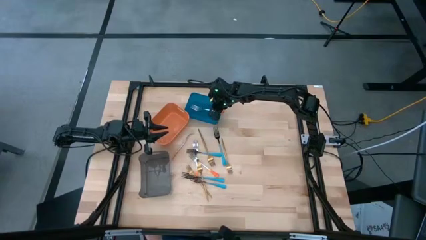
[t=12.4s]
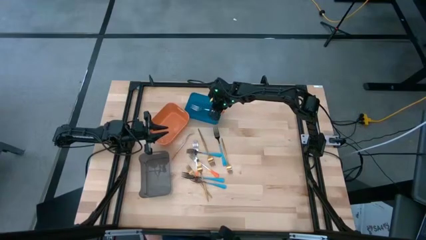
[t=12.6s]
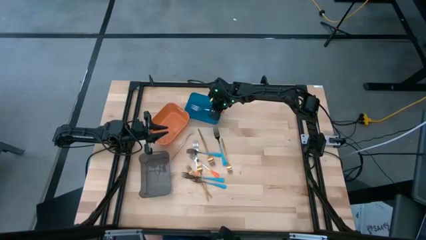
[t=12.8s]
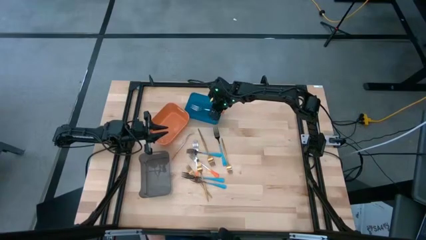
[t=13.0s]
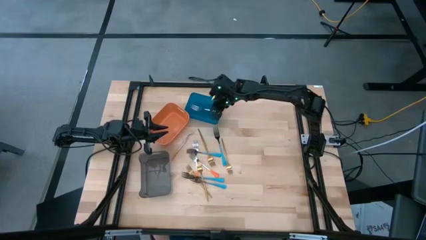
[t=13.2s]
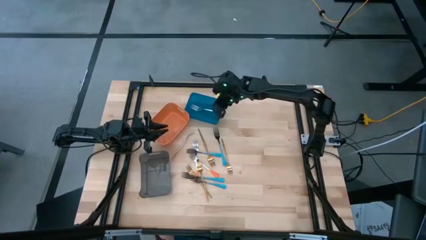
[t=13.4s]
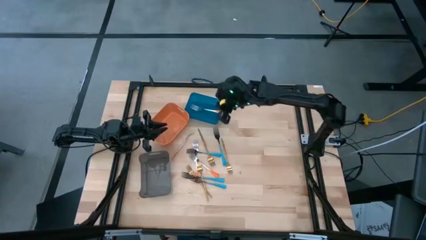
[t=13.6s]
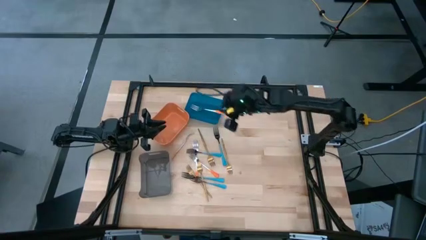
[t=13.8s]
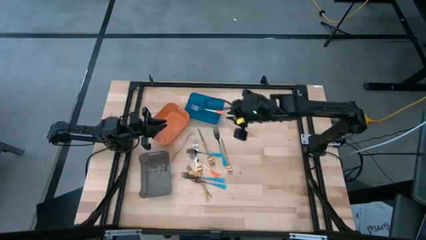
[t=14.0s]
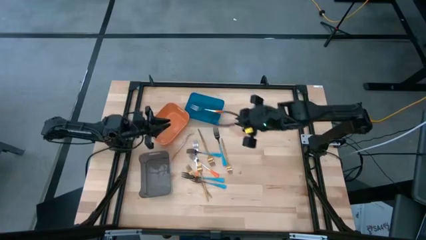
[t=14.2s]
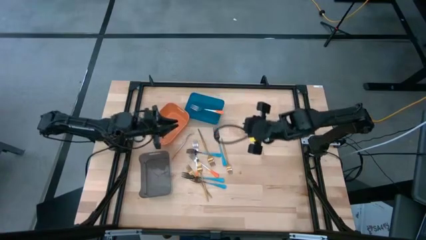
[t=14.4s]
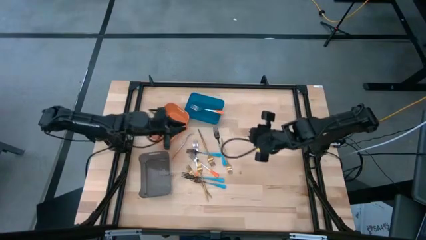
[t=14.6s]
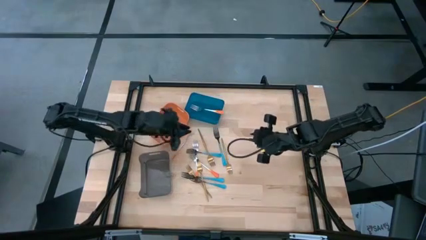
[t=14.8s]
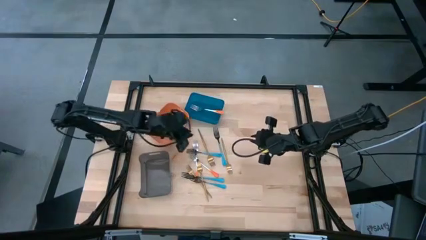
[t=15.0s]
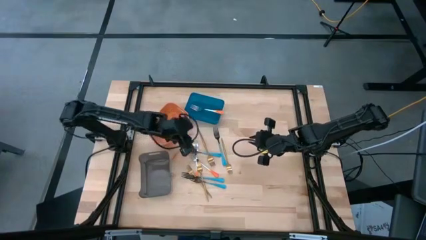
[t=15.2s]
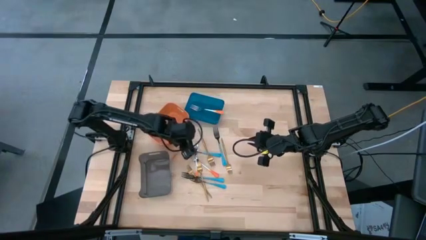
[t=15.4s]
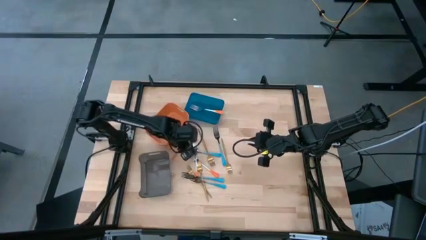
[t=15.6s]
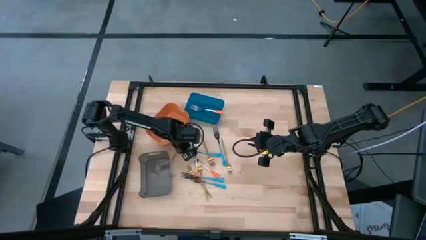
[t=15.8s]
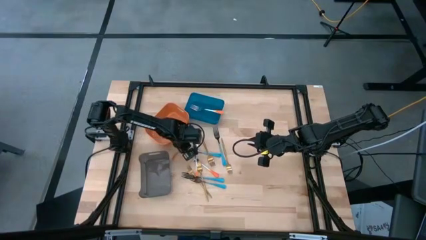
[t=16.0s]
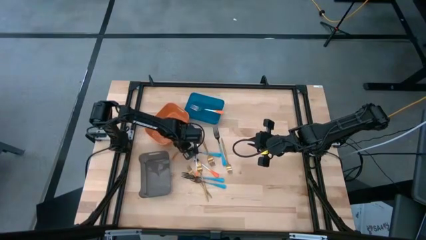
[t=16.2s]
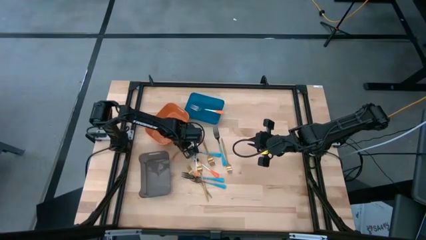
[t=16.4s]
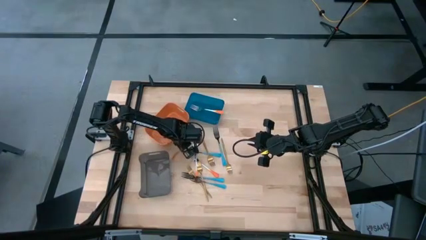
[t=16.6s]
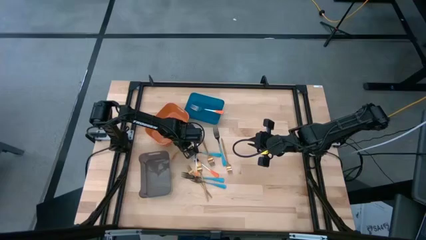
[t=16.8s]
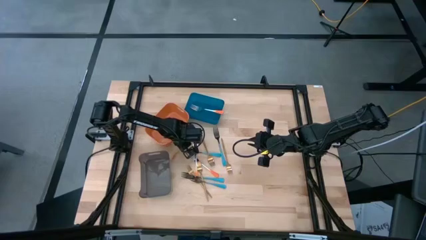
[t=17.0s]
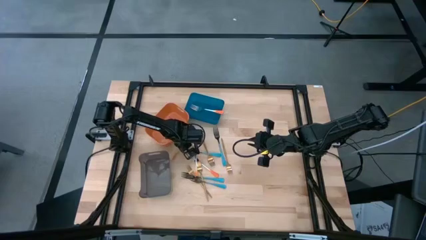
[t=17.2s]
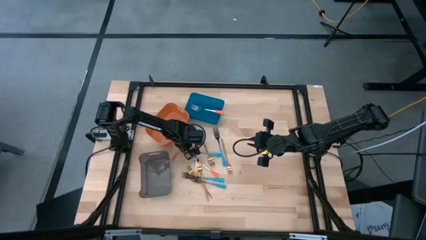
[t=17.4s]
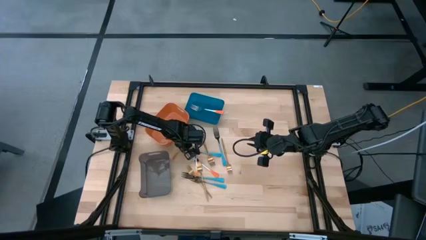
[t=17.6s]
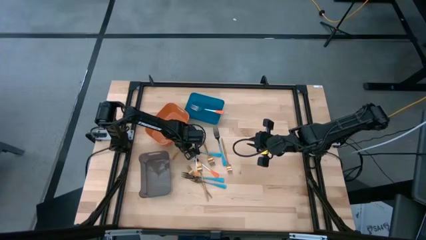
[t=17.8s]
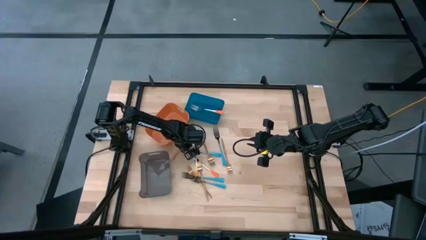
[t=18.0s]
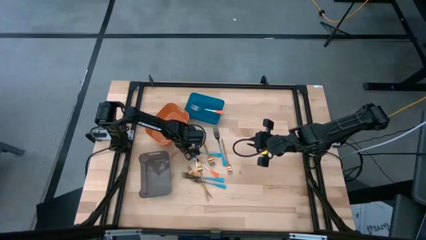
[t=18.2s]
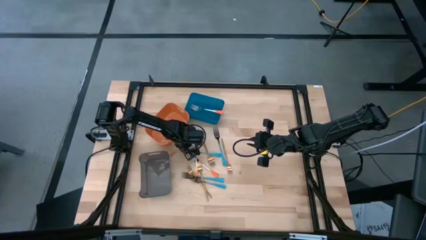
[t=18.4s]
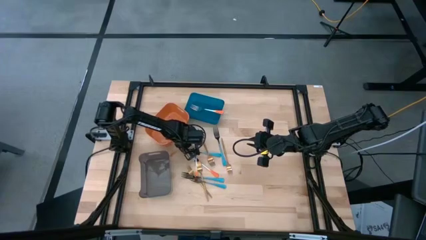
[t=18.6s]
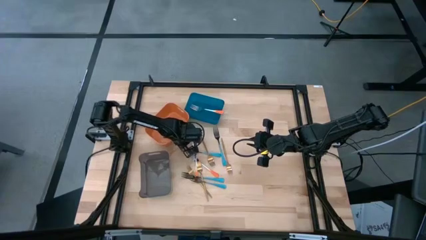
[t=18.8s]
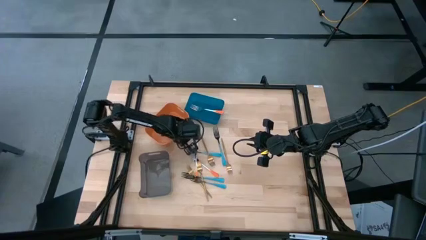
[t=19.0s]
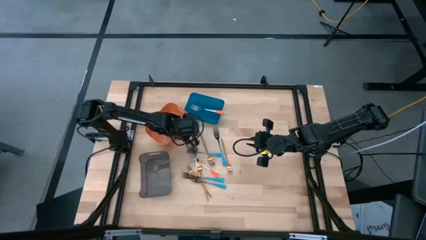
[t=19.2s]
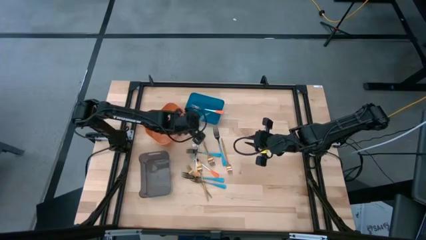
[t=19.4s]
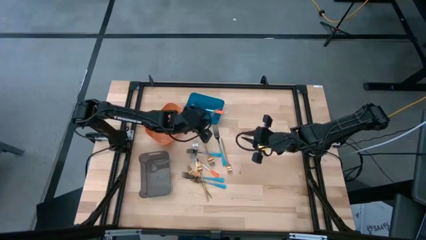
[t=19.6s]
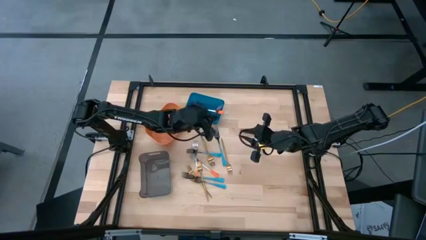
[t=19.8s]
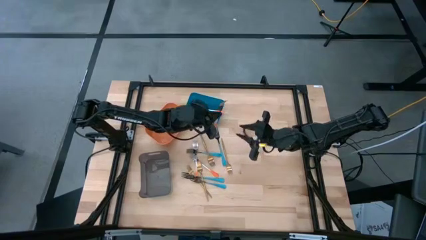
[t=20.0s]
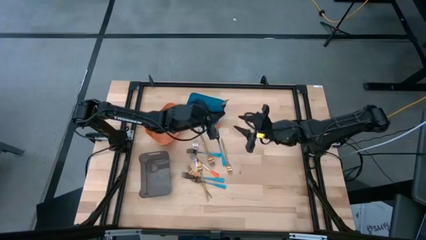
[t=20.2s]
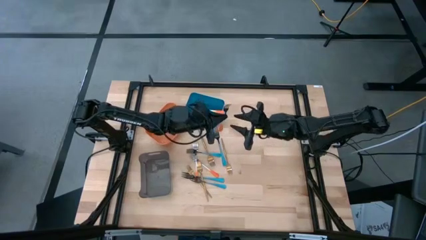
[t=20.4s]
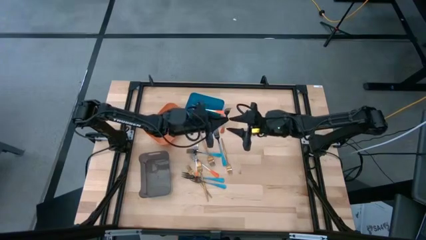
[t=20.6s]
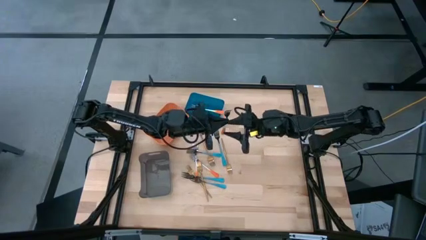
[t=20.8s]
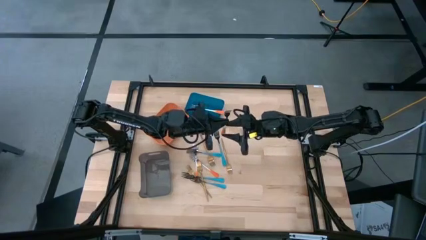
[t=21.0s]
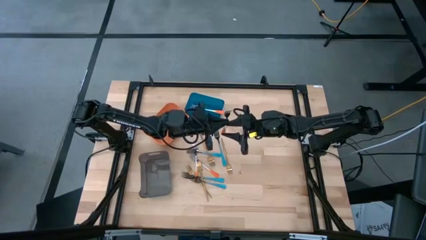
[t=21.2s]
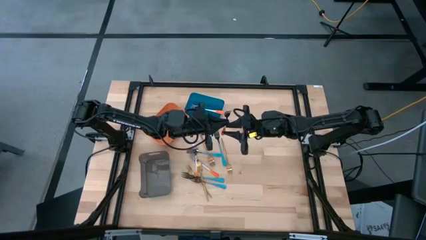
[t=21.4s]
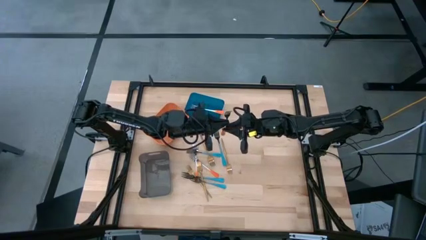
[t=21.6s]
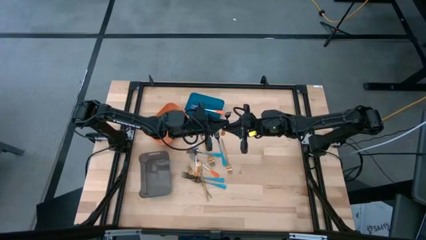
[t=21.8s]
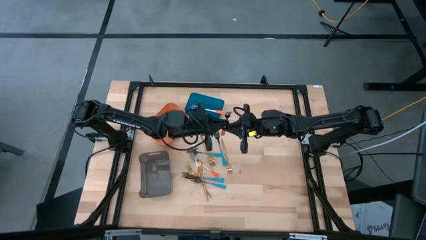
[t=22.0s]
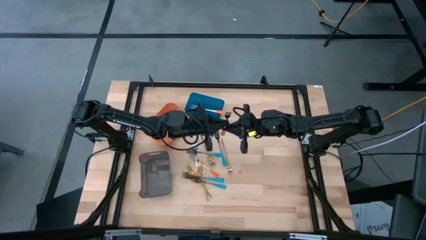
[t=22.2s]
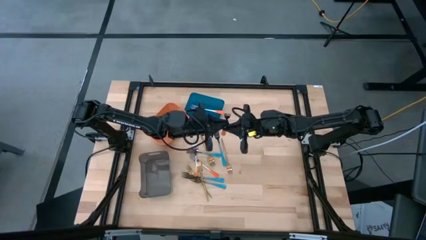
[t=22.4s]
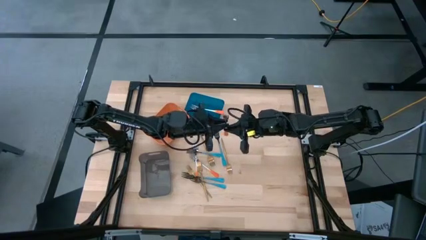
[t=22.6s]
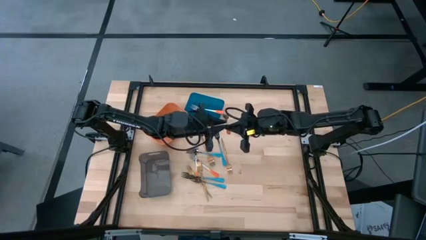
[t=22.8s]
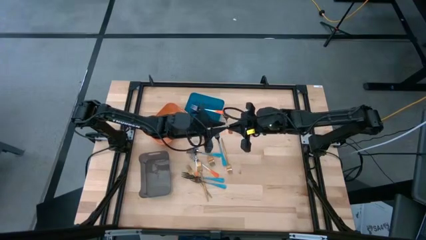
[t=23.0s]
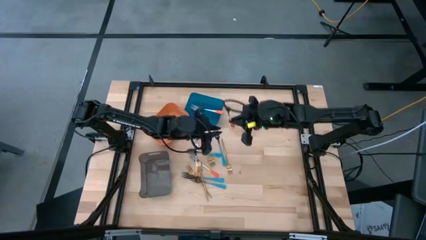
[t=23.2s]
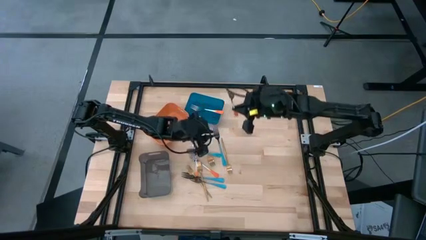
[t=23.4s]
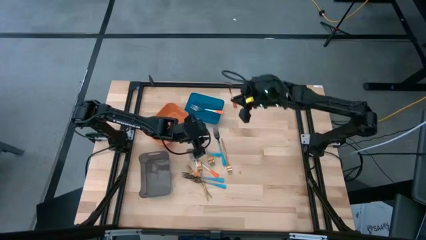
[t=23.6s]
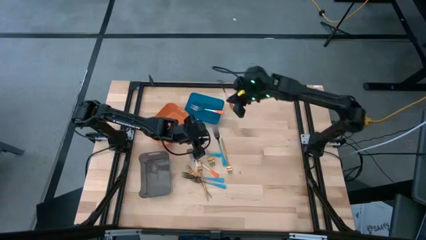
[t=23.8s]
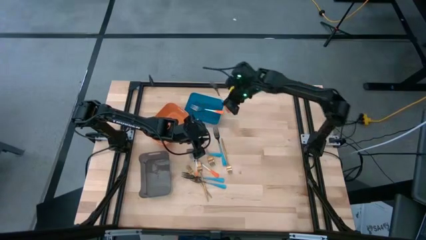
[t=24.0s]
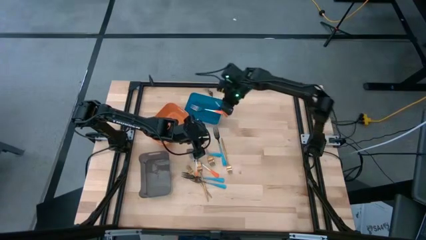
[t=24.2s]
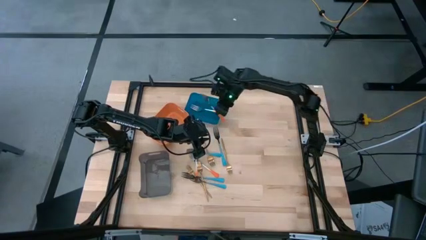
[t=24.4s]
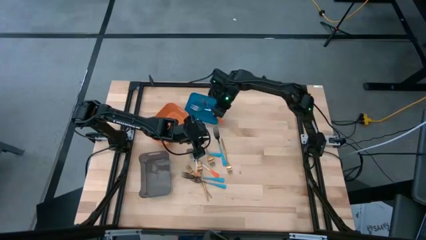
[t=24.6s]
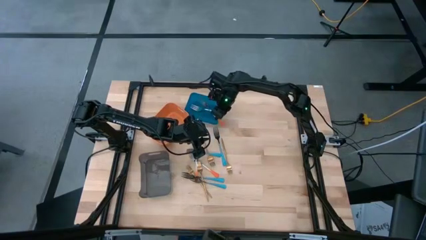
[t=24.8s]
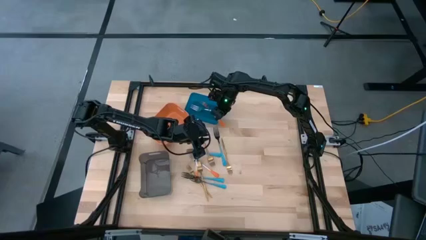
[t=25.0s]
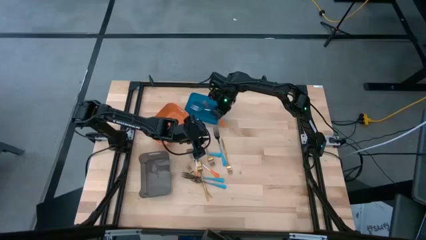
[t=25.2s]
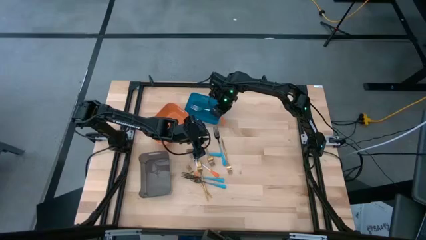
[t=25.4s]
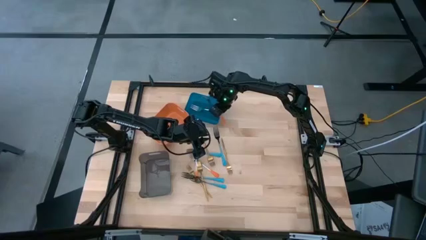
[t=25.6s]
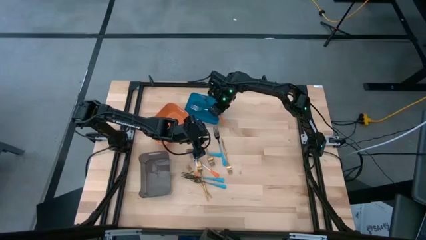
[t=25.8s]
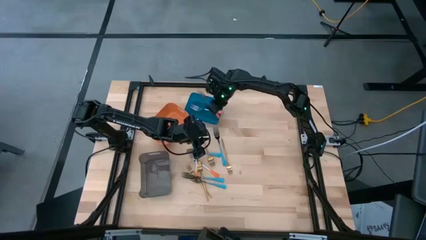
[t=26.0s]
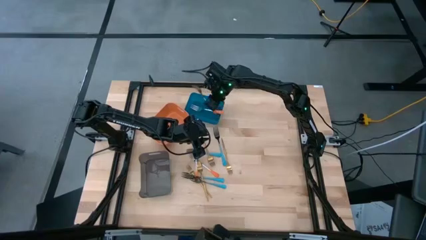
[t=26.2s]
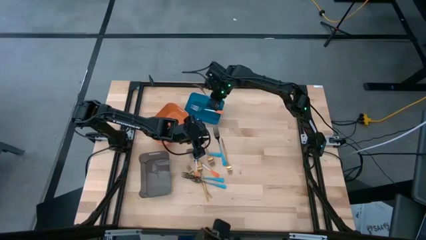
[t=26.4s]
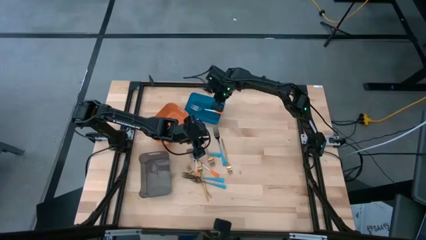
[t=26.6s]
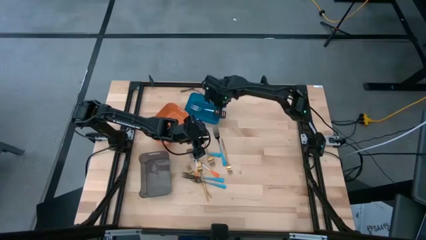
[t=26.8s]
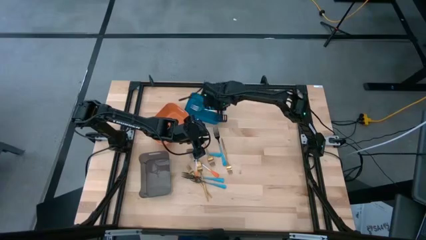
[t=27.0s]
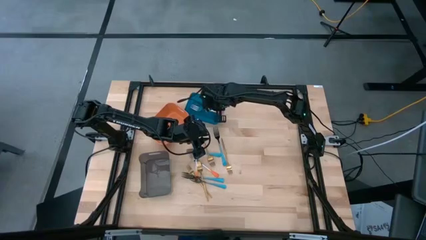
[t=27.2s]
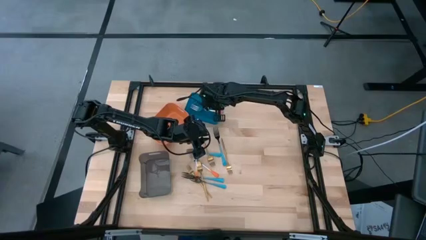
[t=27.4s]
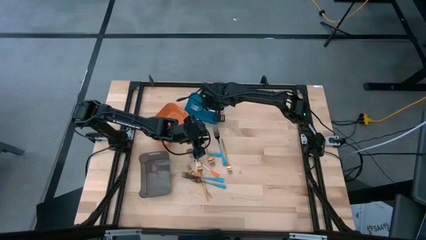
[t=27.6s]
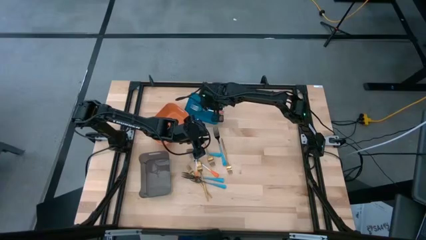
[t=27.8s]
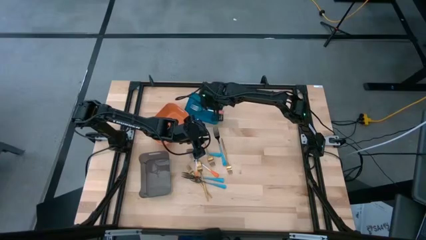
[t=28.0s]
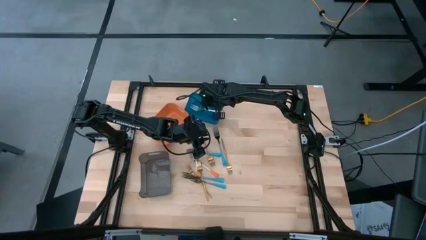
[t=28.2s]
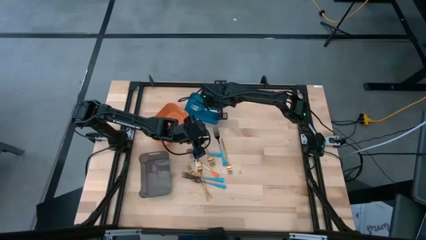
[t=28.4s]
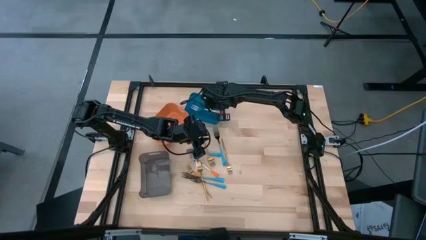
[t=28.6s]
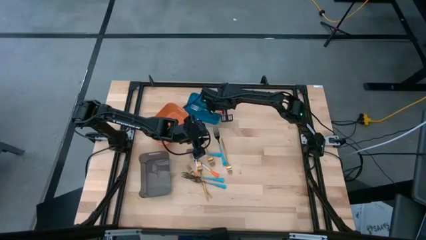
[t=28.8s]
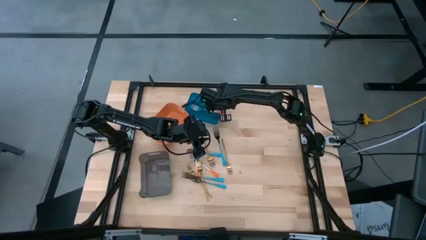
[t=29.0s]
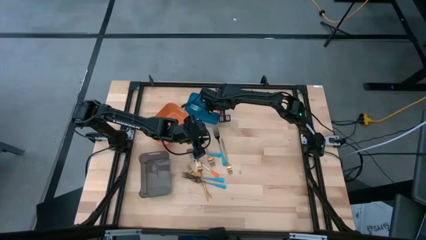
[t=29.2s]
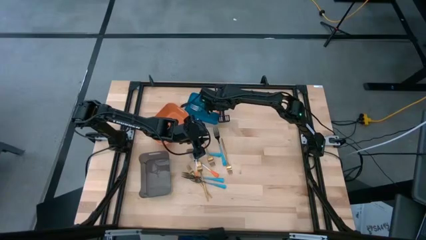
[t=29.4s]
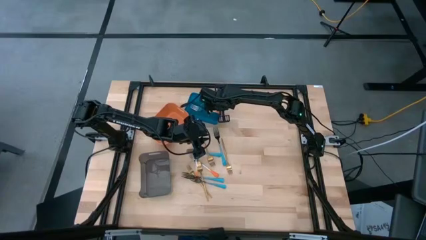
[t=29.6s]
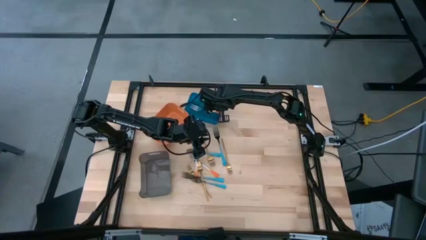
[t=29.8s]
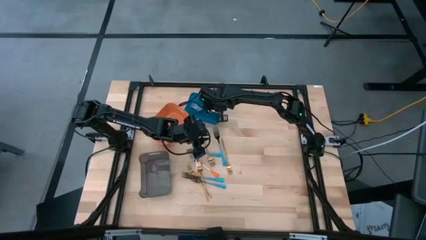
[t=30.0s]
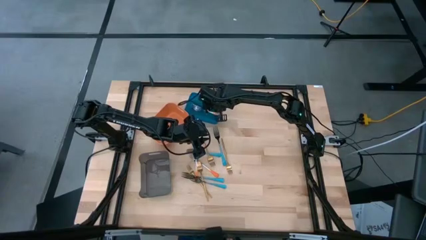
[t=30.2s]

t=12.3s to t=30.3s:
Task: Sort silverware by color (type)
Put the orange fork into the blue bin
